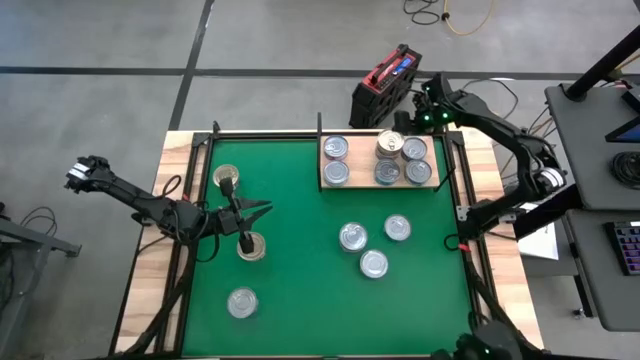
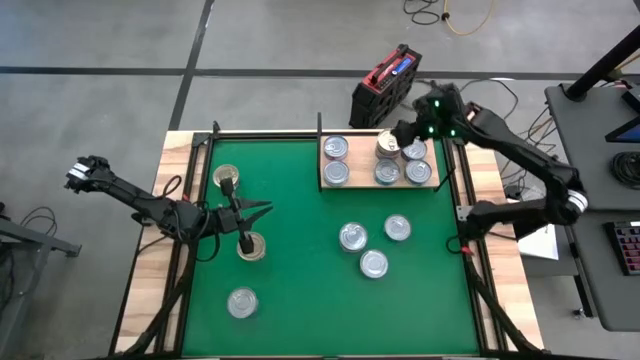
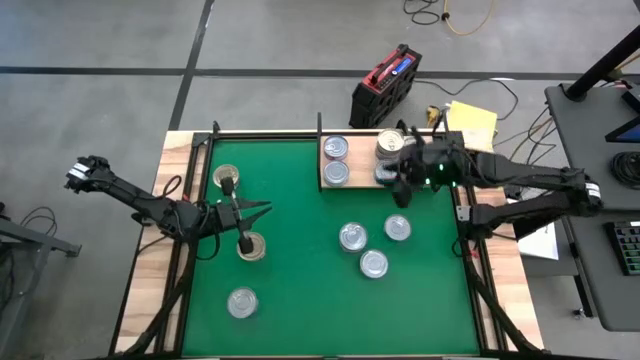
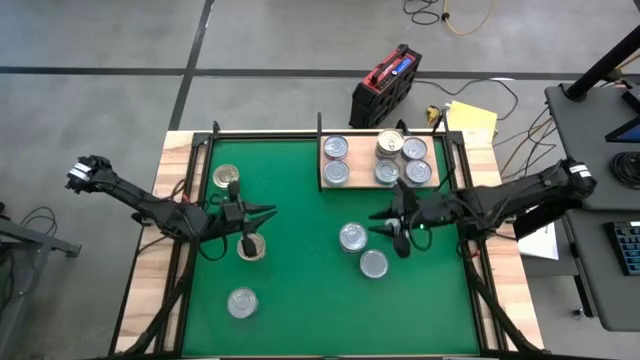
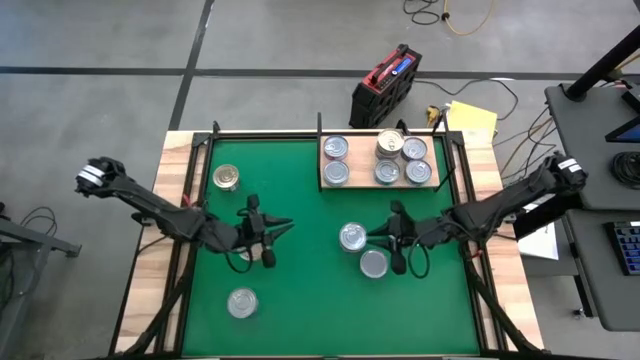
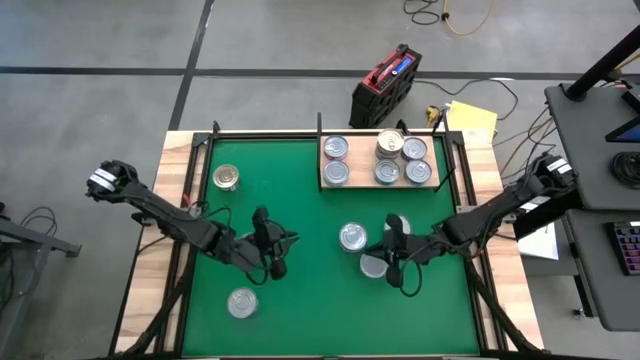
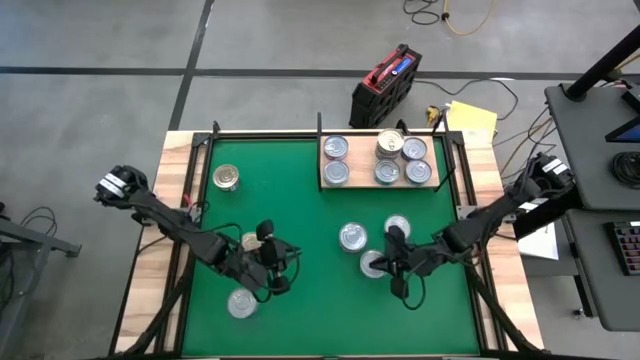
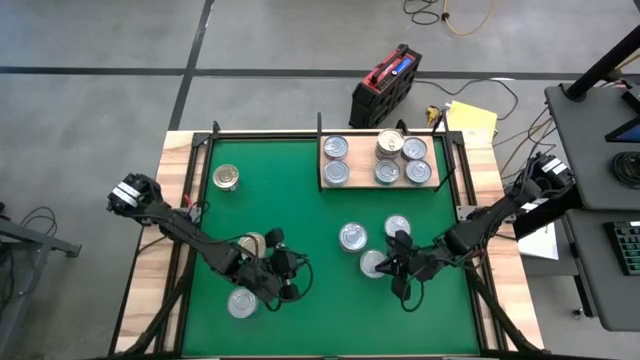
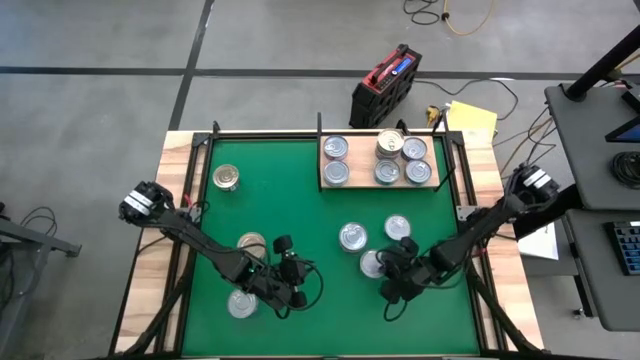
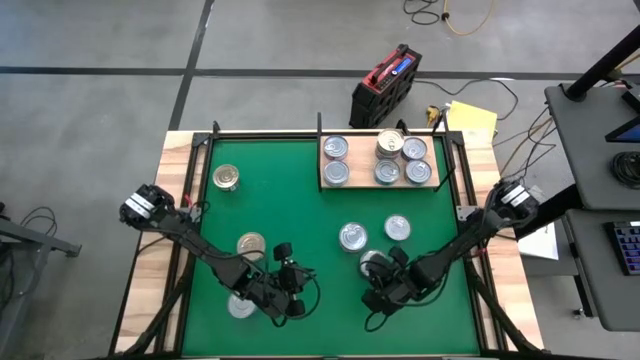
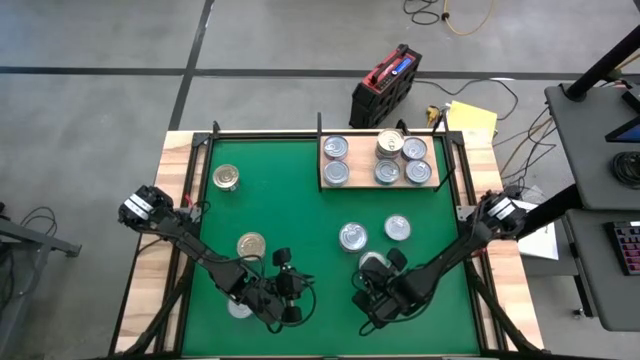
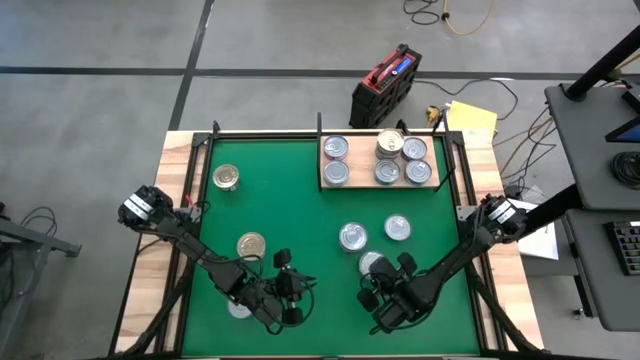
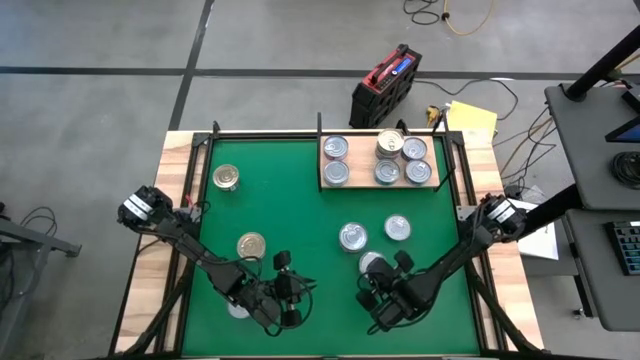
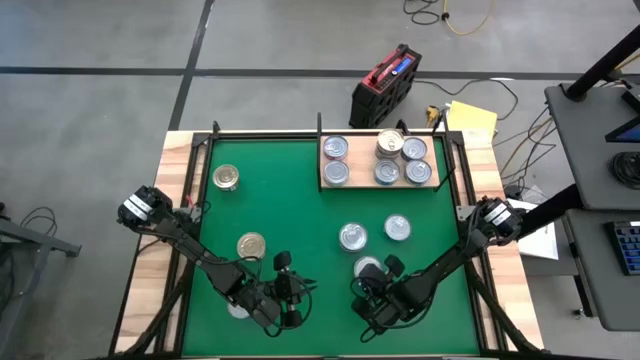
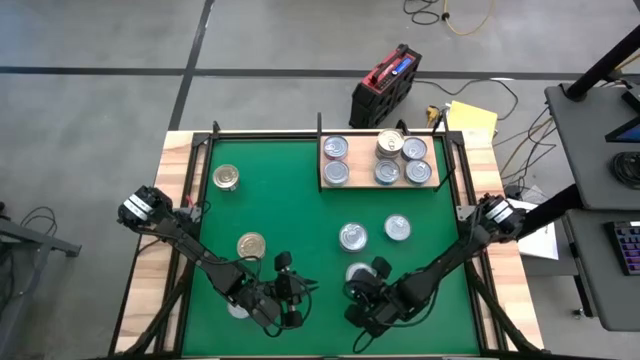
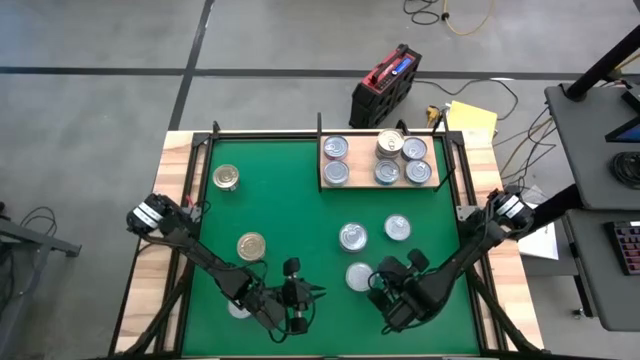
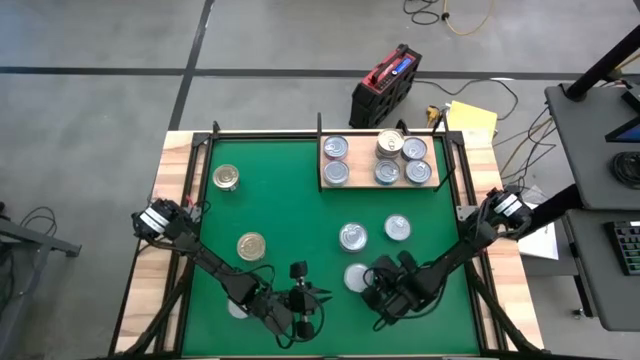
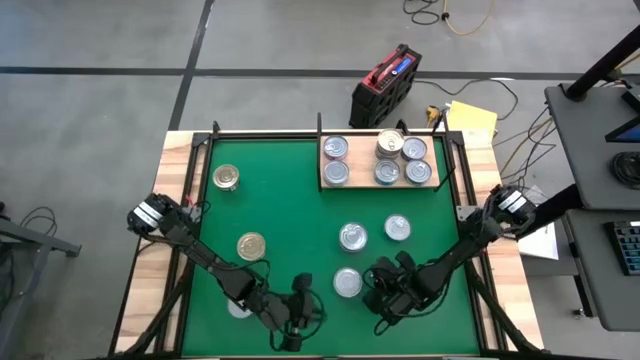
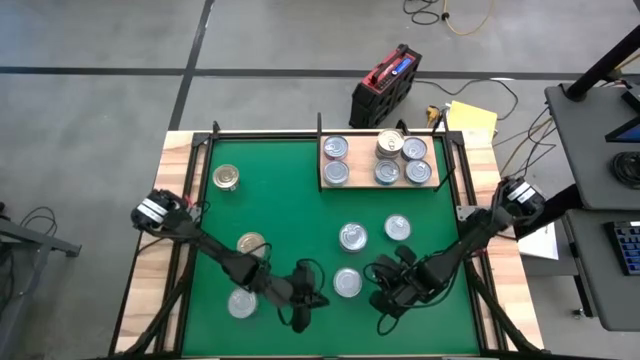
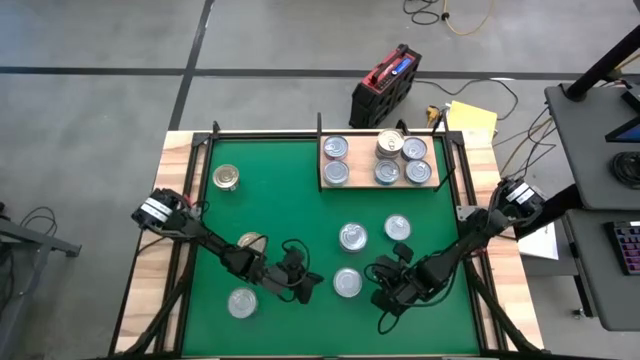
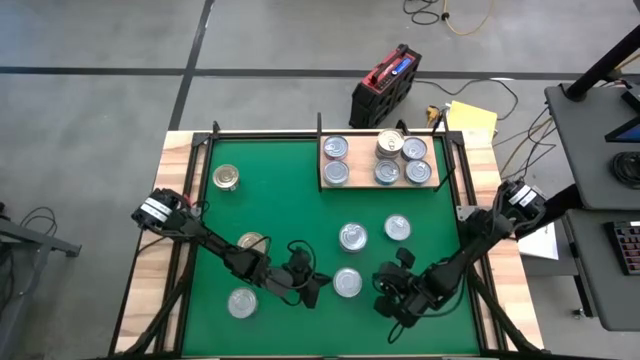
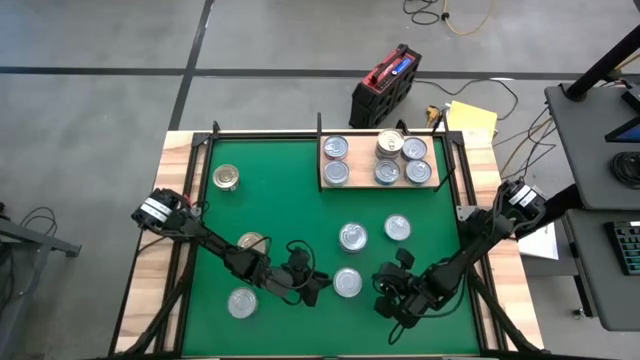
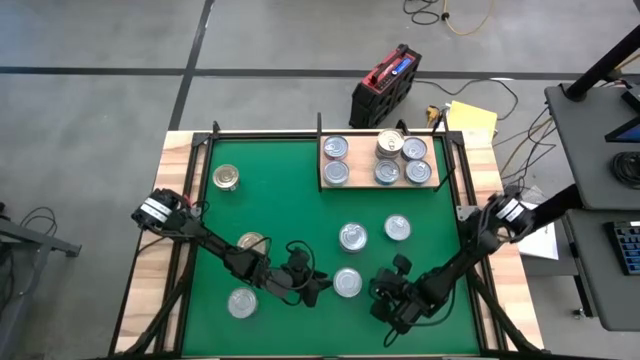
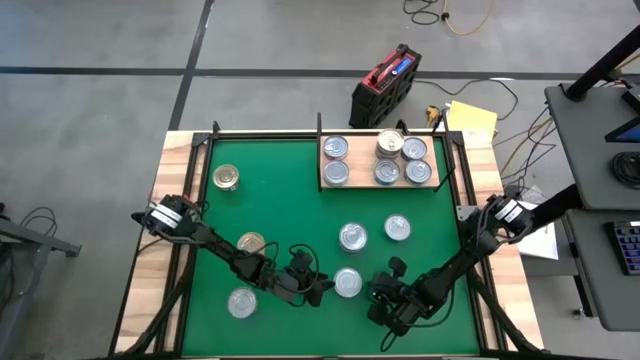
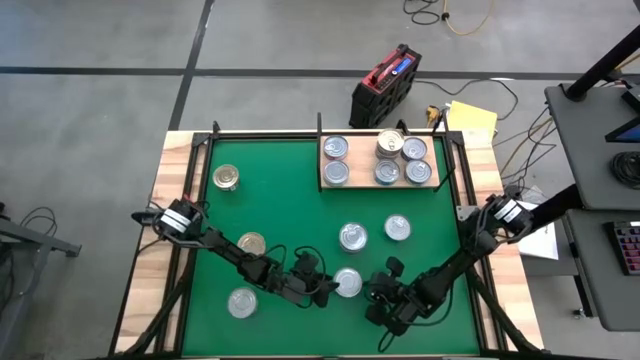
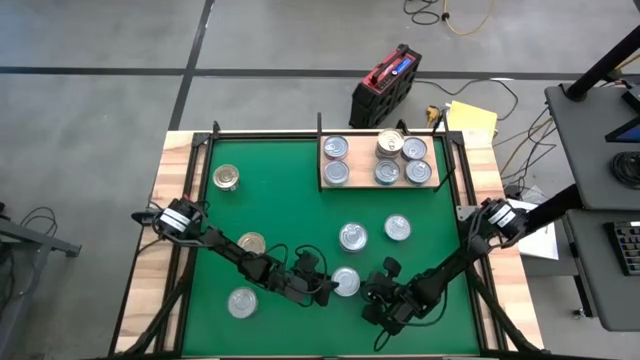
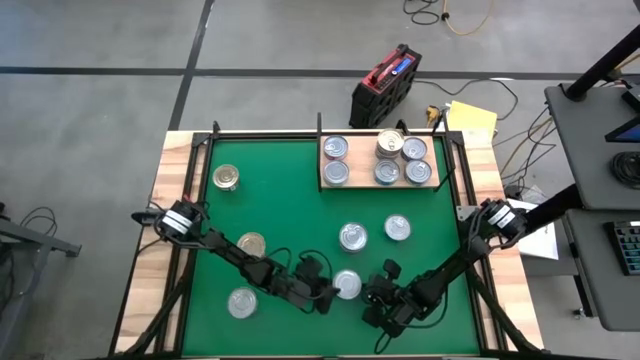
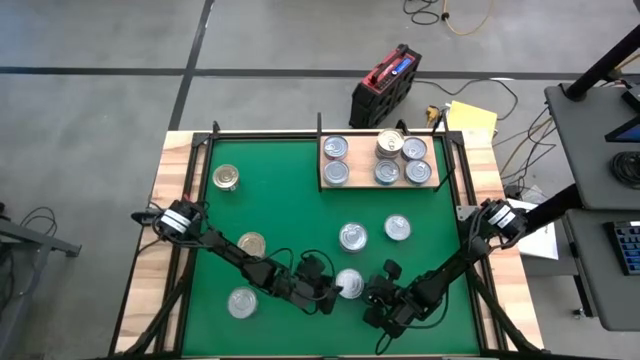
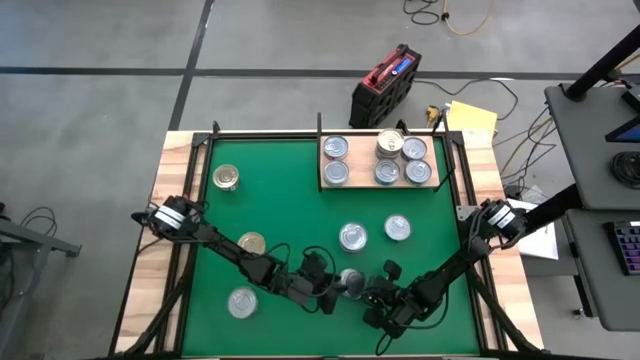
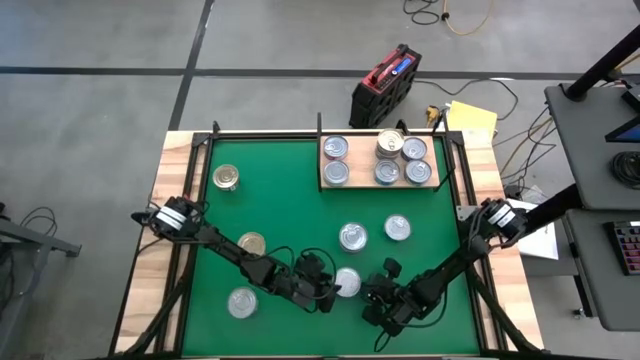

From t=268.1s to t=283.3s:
Task: Stack canned seafood by type on shelf
Stack the green tuna can on top of the green tuna can on the shelf

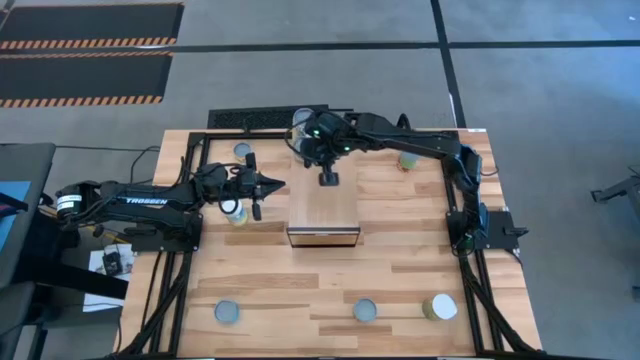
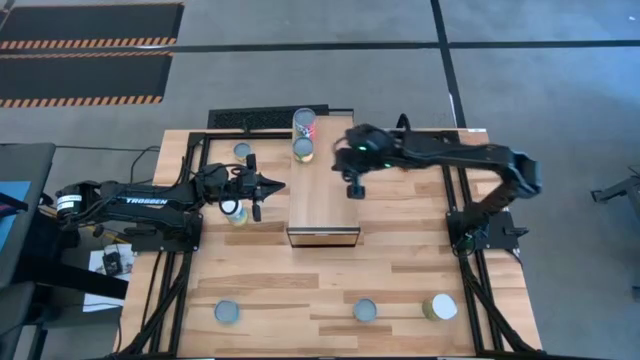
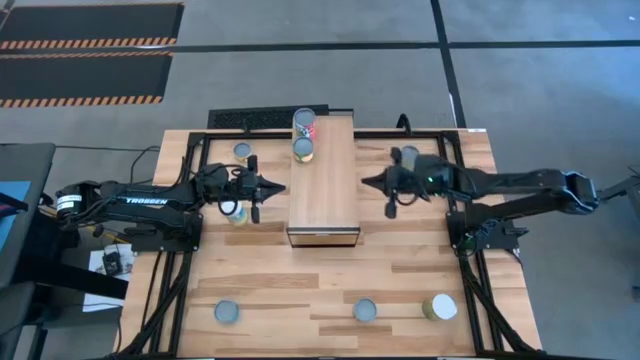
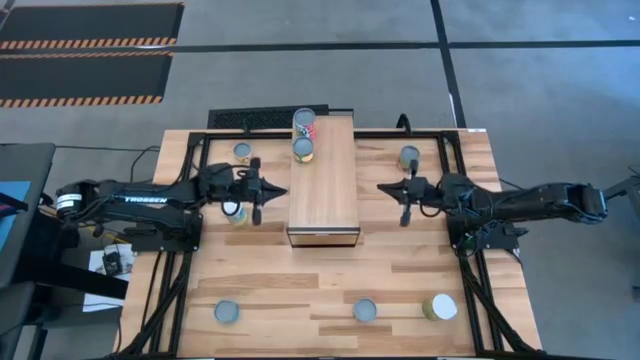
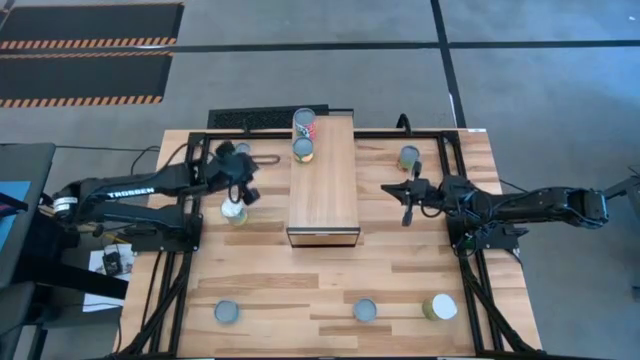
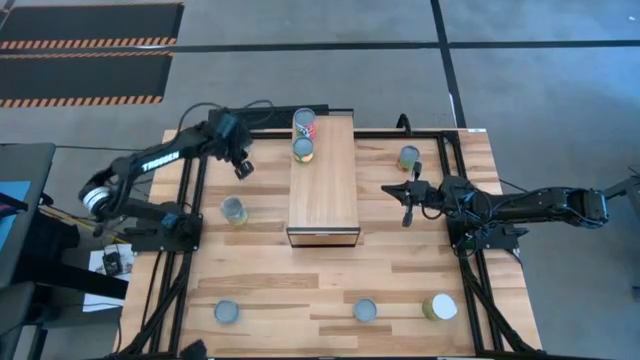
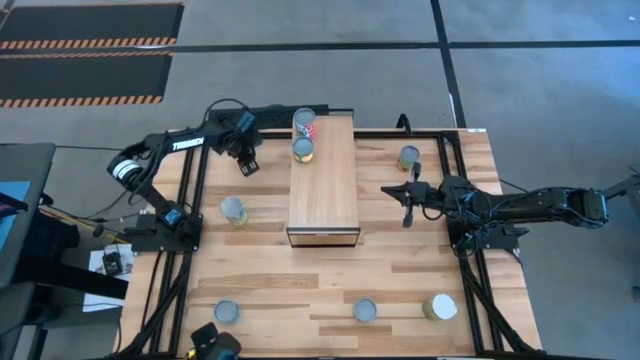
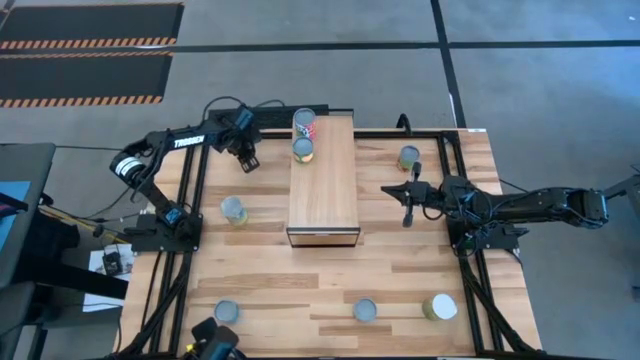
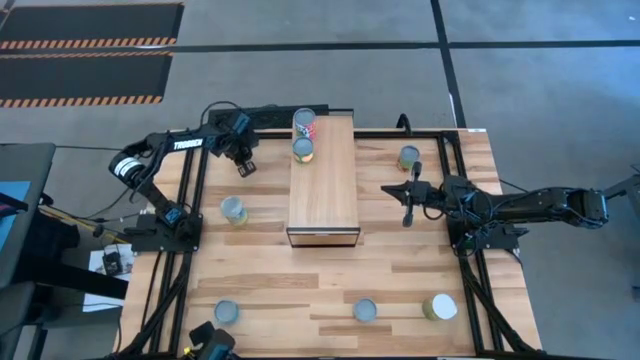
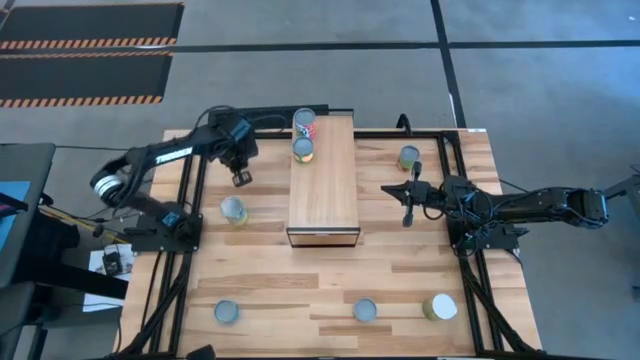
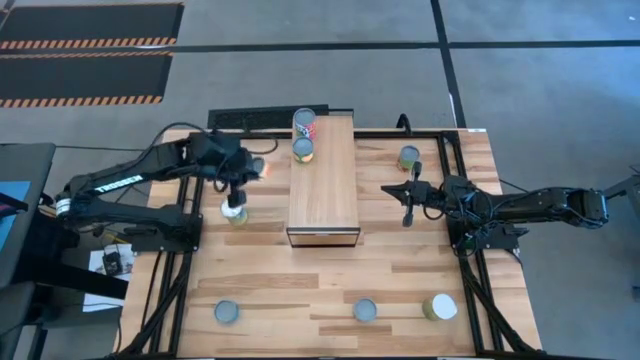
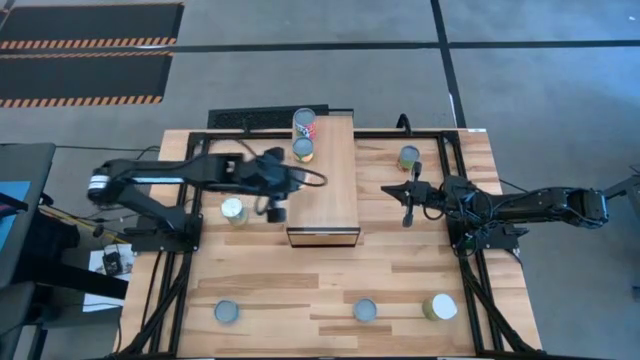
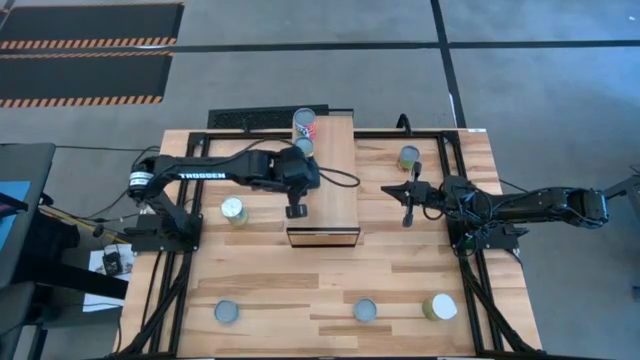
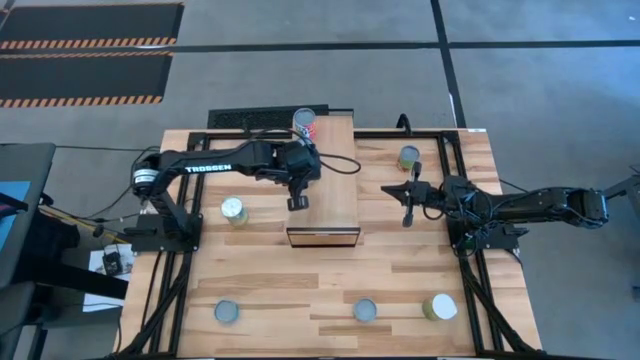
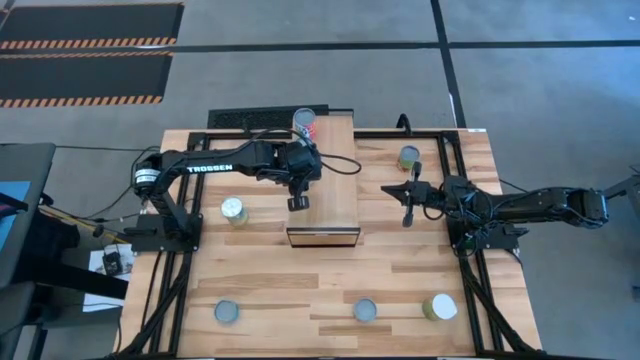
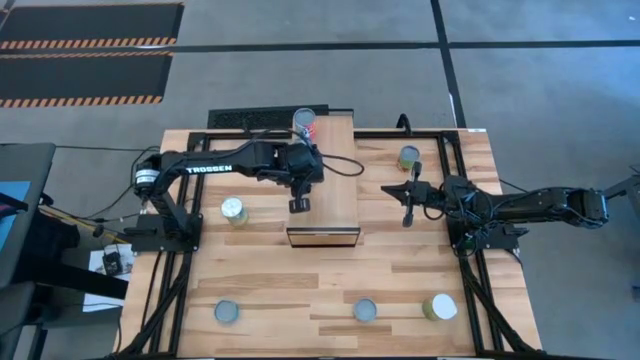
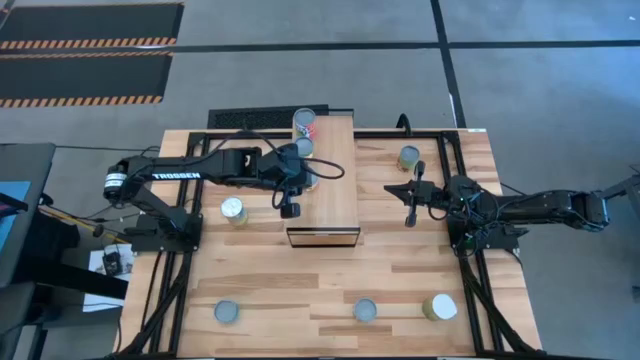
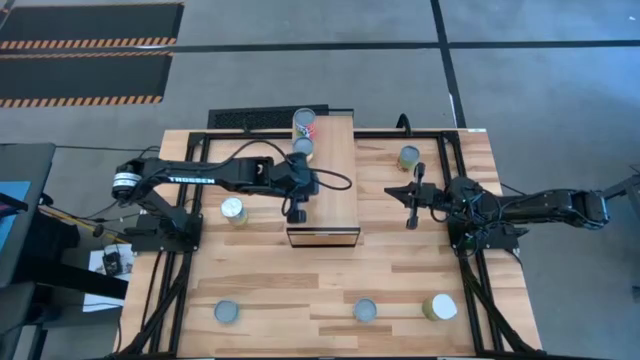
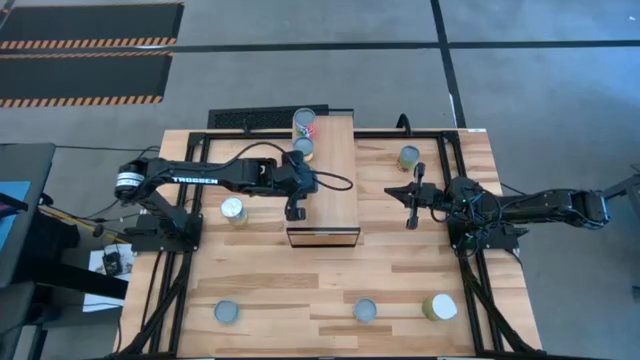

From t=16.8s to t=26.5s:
Task: Pick and place cans onto a shelf
Put the canned mushrooms on the shelf
